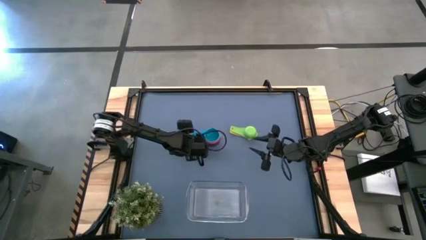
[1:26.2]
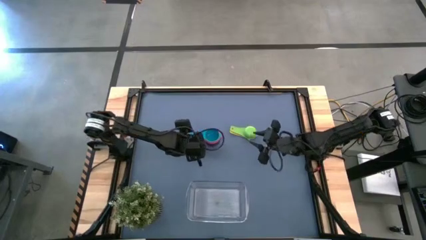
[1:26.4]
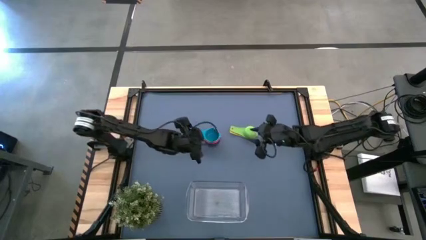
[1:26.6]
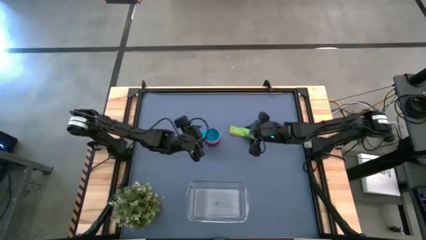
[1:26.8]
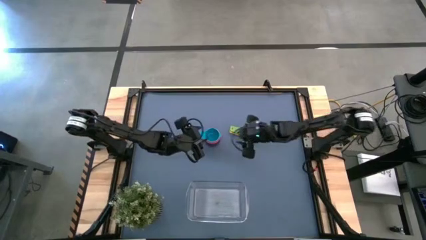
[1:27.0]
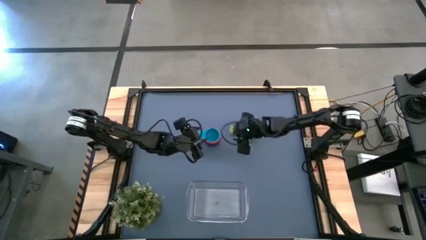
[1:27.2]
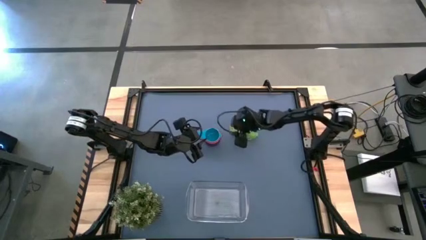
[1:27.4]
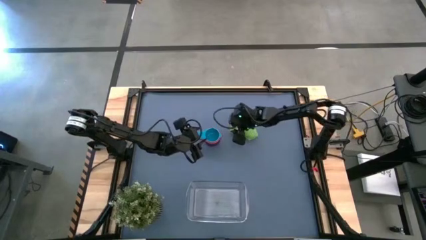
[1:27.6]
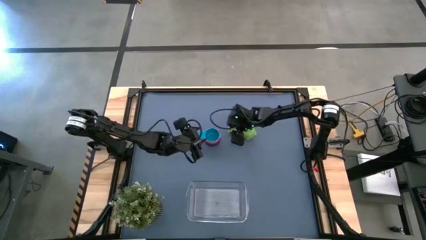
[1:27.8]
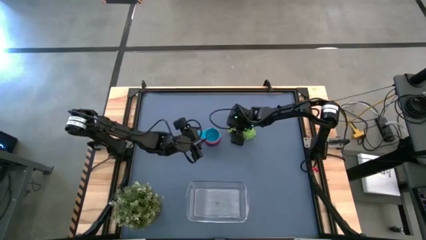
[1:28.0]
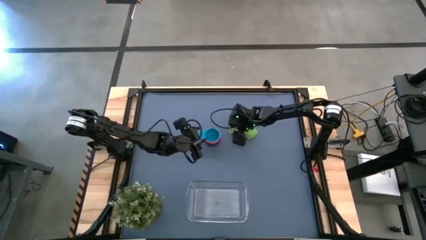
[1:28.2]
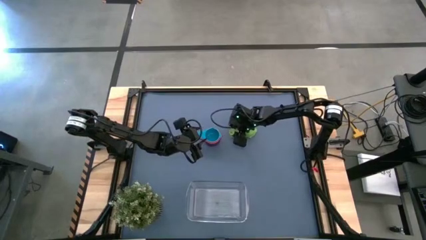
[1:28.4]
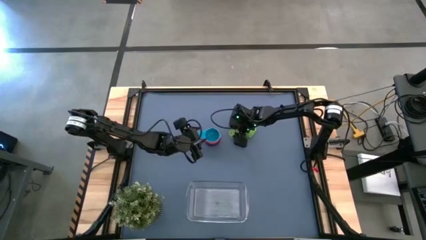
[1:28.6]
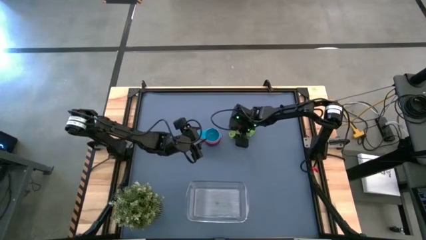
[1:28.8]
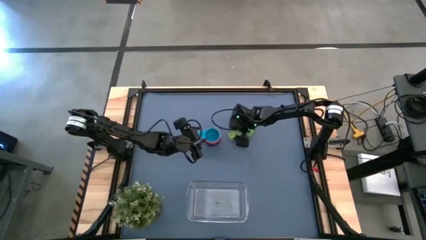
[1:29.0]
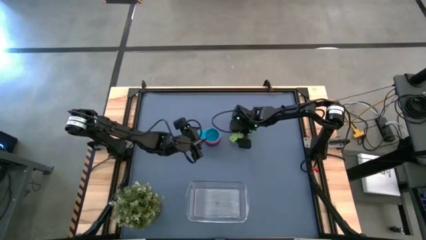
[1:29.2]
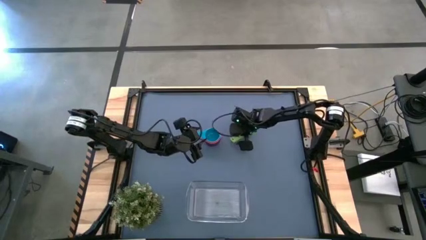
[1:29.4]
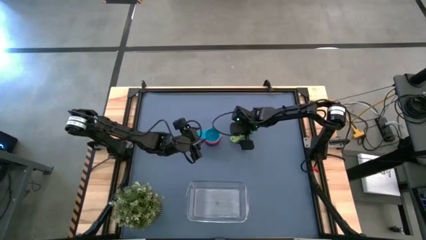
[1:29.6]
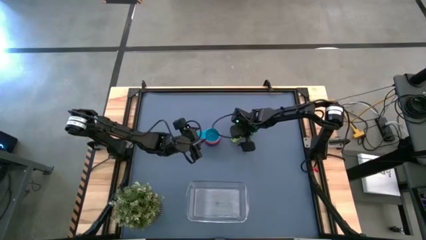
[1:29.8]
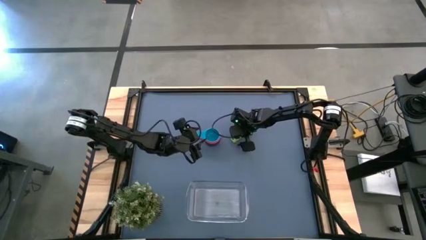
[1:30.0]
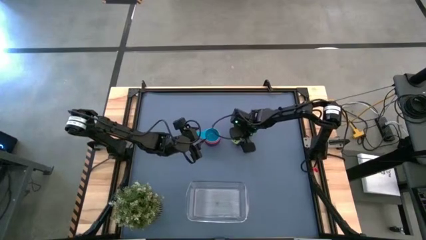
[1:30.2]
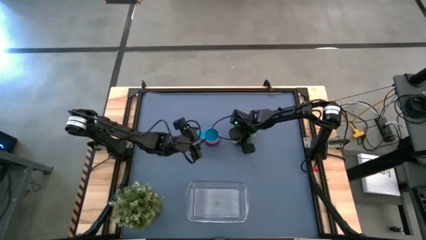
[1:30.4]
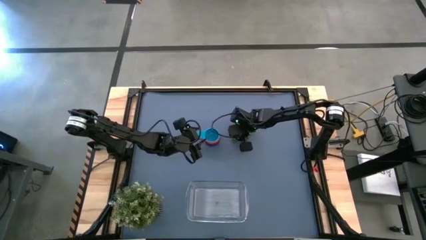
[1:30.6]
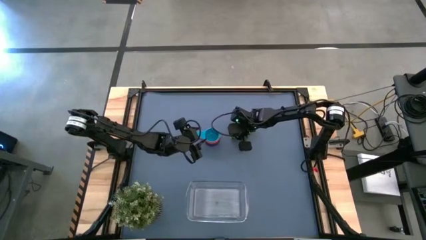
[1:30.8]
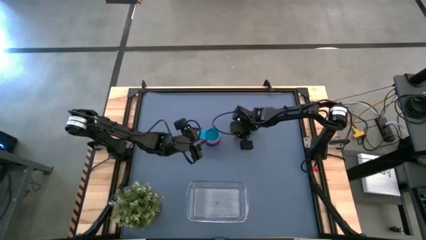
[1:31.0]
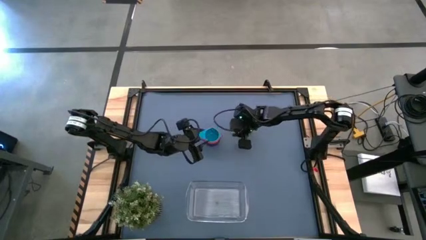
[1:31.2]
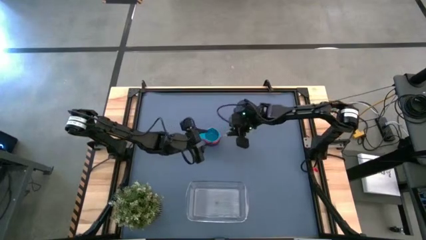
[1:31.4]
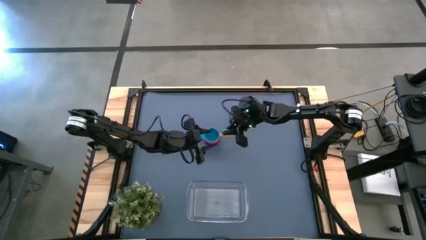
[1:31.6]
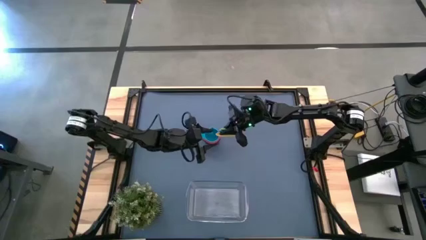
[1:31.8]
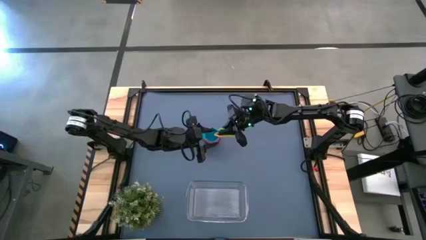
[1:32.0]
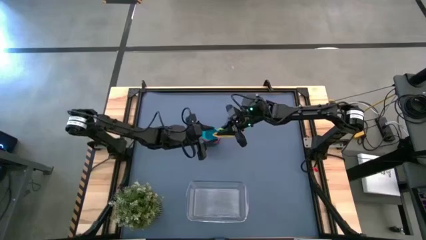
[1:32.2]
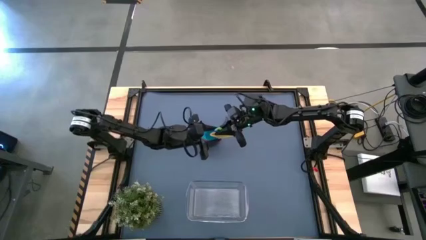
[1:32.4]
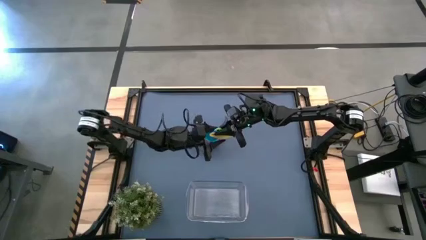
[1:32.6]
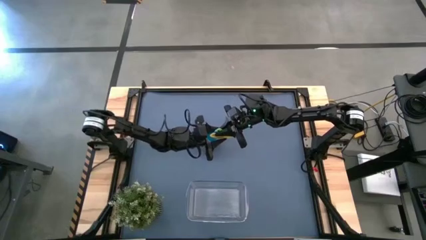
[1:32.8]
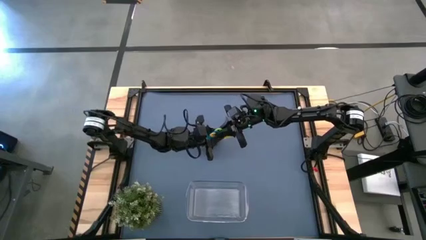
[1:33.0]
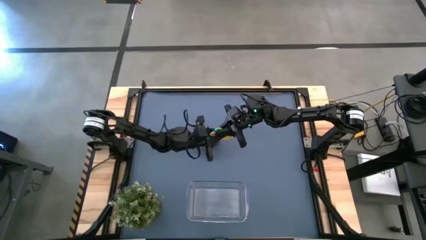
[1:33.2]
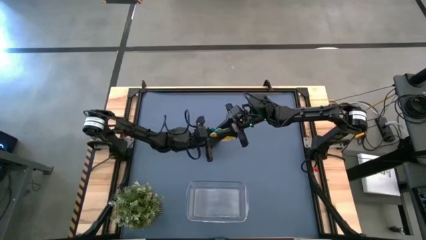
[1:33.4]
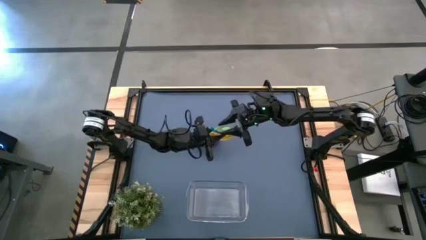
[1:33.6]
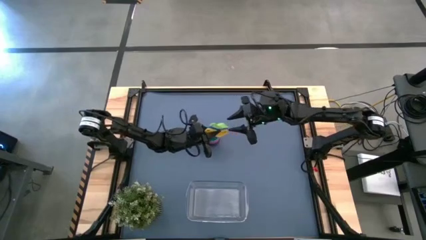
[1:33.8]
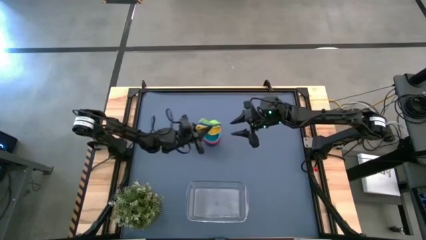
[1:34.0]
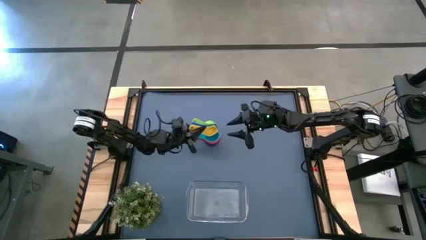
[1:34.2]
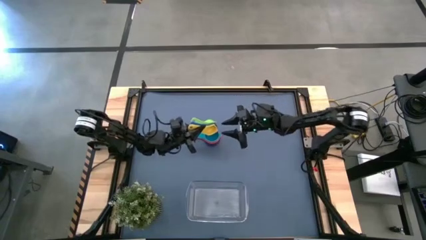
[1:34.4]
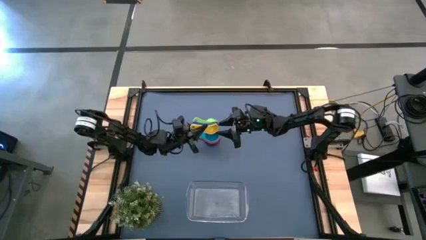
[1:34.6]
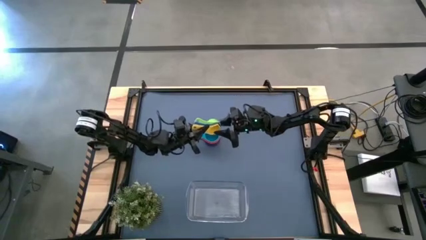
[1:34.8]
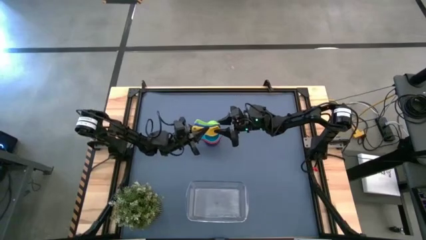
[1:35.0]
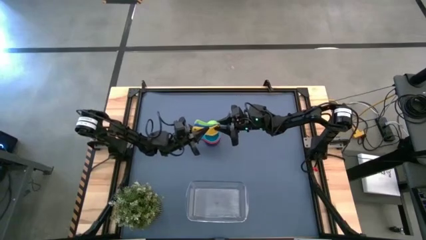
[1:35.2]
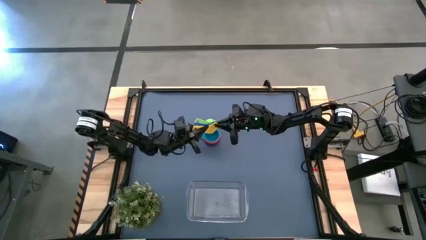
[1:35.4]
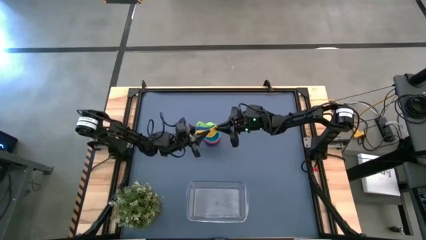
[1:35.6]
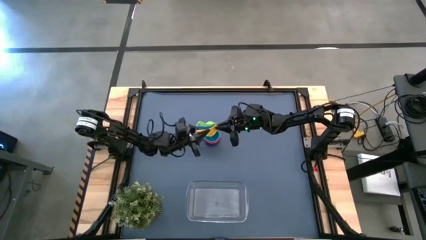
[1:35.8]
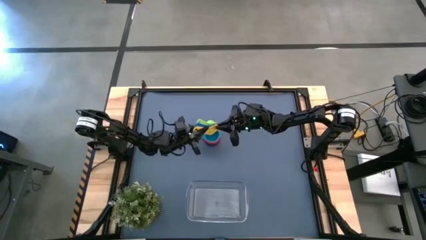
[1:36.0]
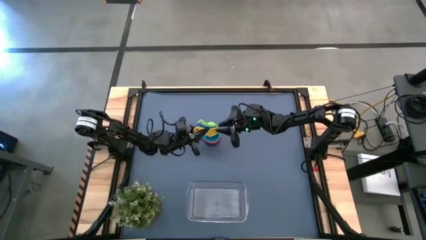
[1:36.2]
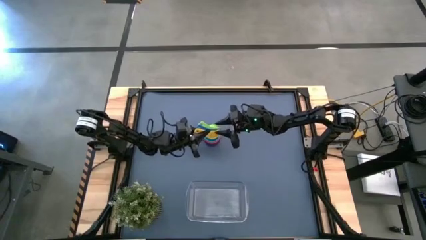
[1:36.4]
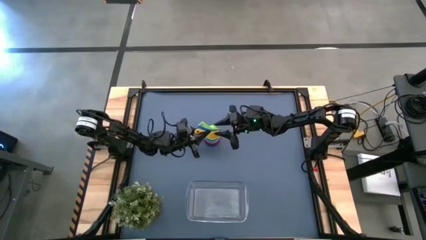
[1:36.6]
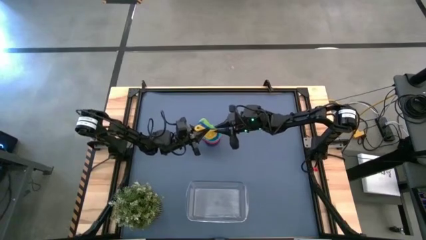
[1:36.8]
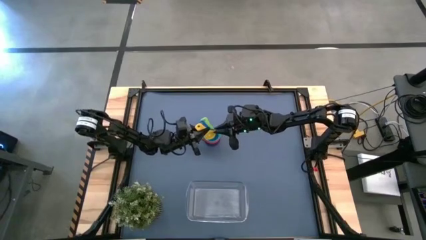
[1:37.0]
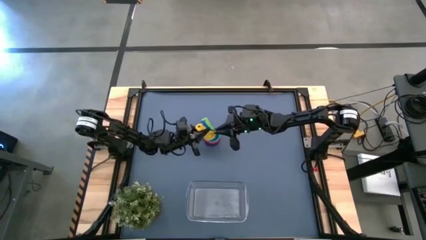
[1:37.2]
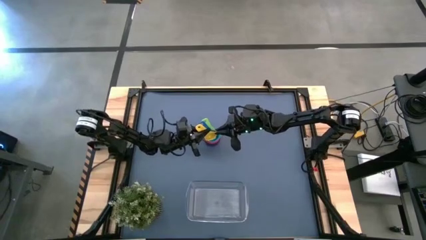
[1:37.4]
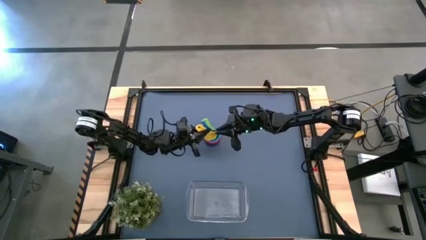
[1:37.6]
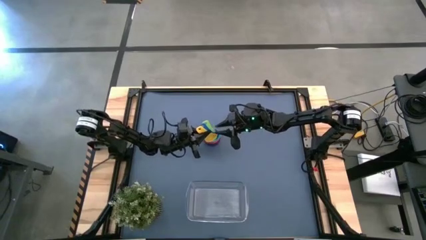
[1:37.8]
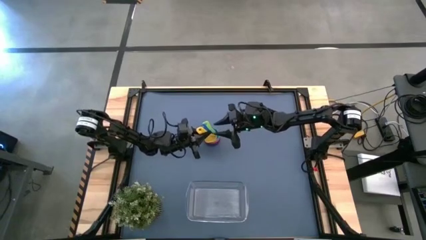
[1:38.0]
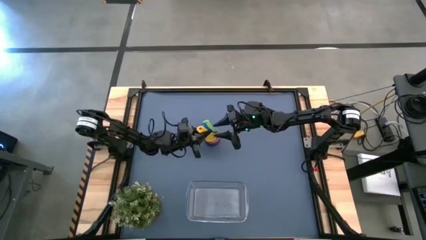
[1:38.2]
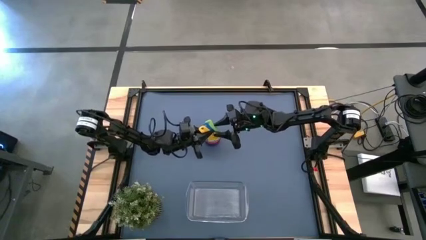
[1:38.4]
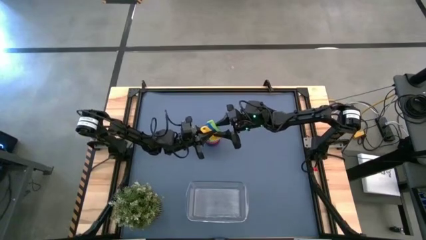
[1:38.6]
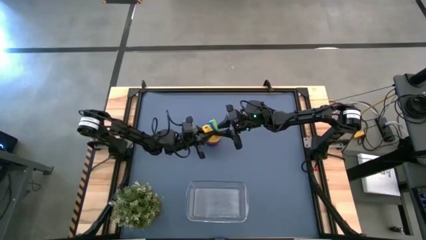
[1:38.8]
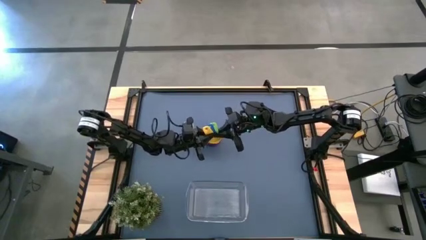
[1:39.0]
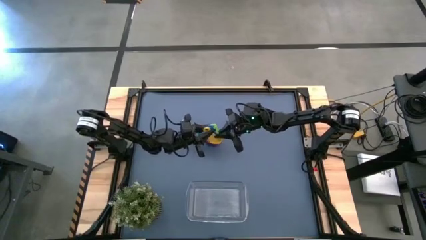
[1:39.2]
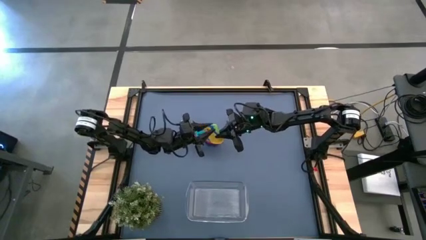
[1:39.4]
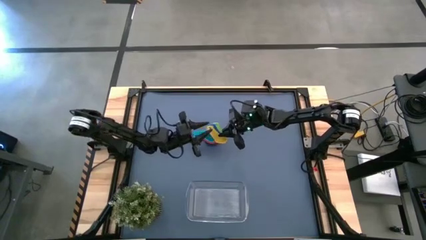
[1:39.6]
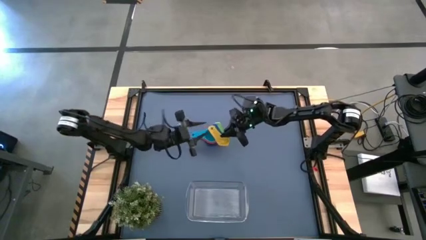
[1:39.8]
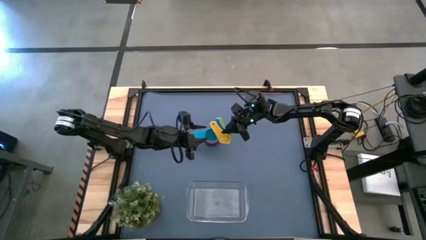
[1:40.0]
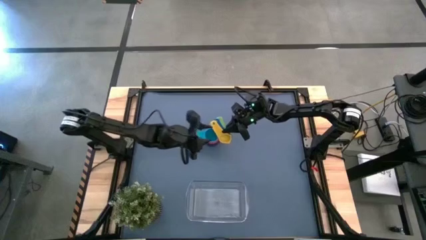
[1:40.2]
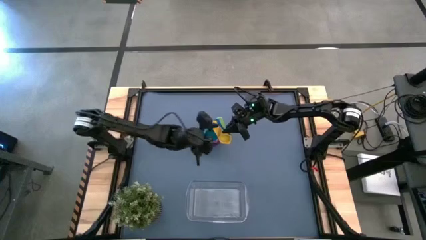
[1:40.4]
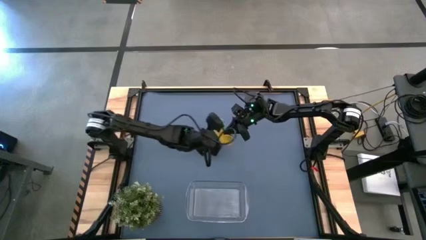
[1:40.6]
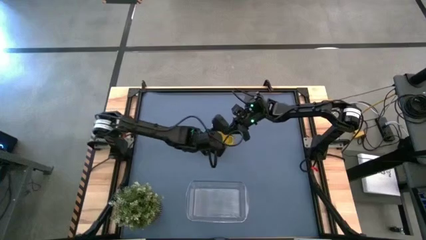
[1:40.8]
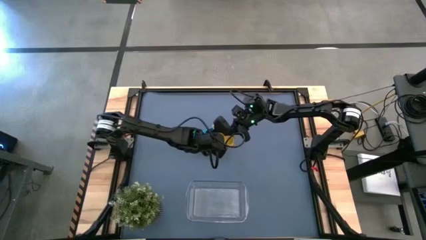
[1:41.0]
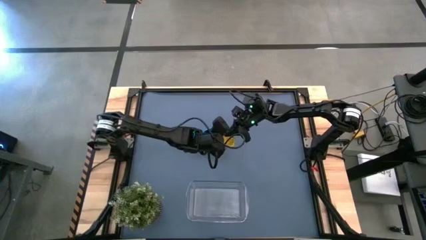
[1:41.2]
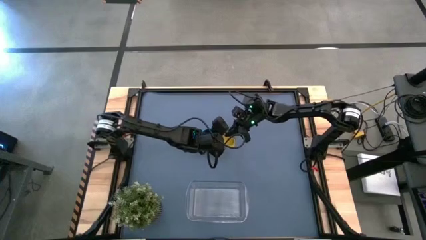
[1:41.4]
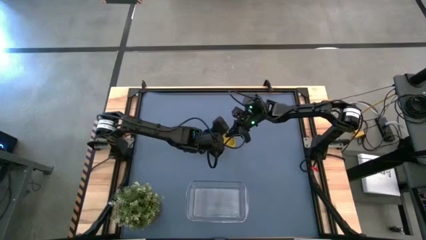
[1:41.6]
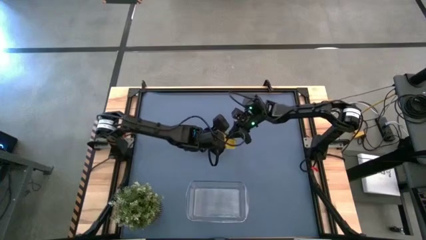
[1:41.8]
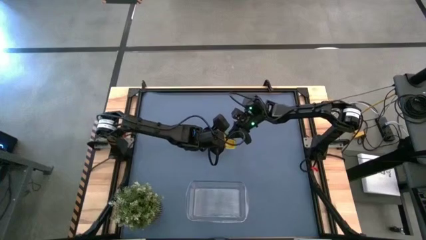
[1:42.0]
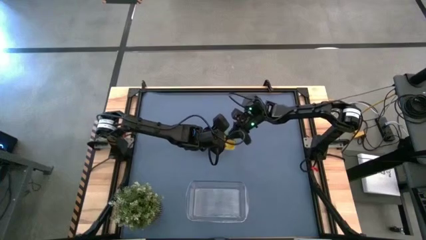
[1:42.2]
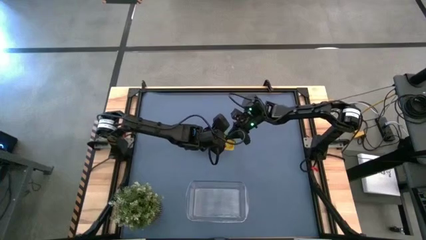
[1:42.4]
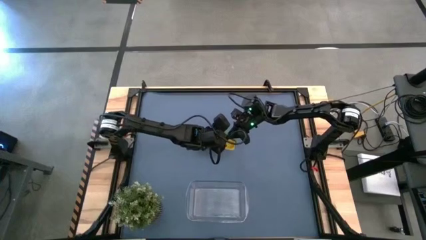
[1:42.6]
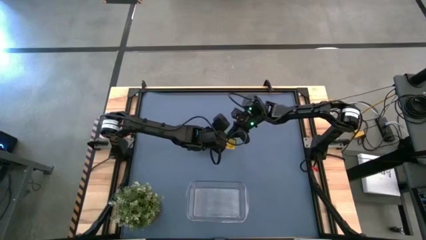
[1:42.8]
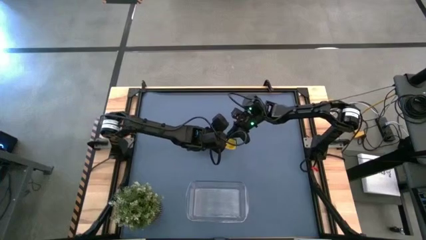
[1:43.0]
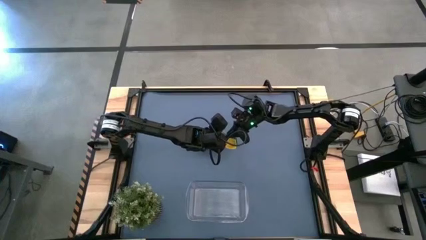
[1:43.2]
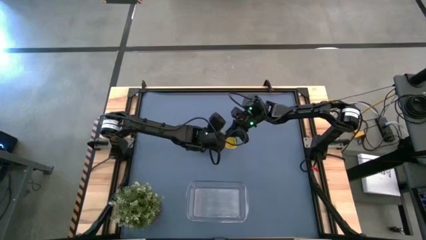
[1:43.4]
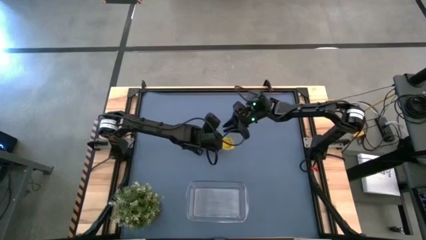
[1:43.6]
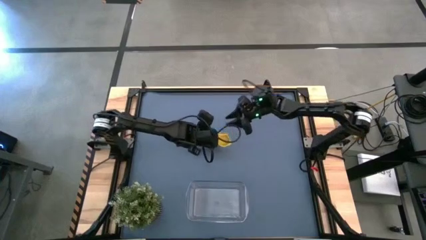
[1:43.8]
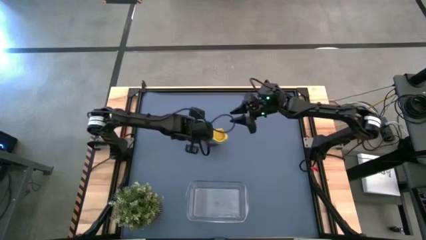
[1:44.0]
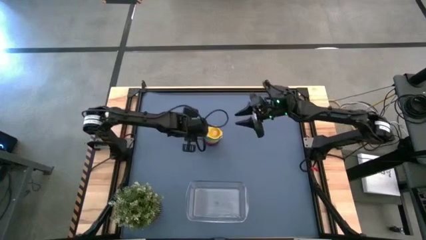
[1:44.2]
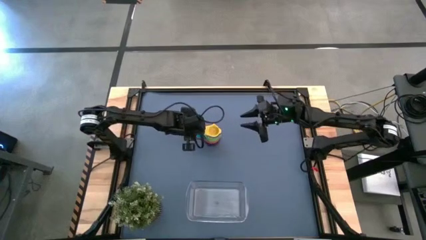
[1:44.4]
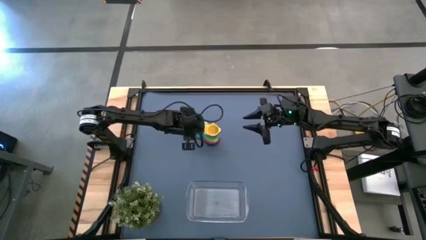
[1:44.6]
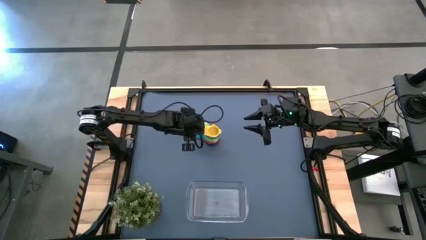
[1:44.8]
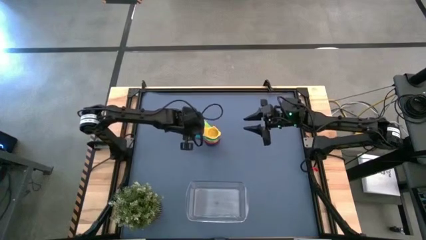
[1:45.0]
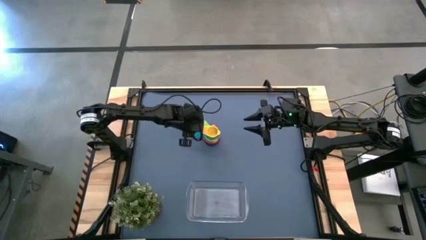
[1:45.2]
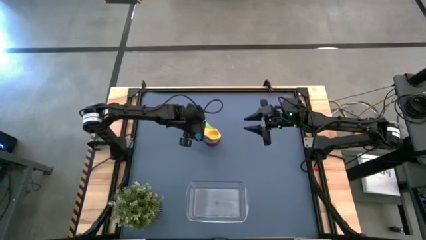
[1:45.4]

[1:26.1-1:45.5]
Task: Nest measuring cups in basket
Stack the right stacked measuring cups on top of the left stacked measuring cups
